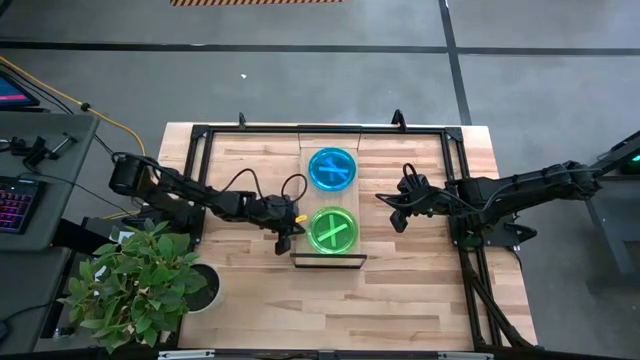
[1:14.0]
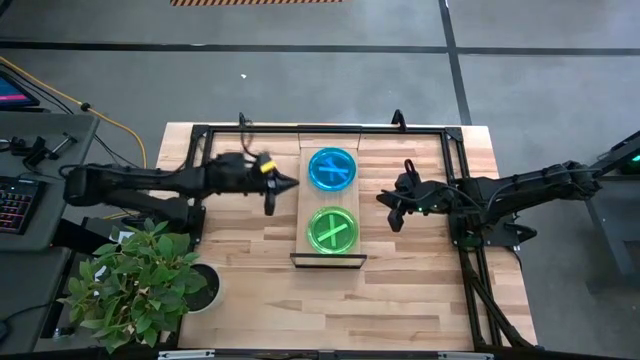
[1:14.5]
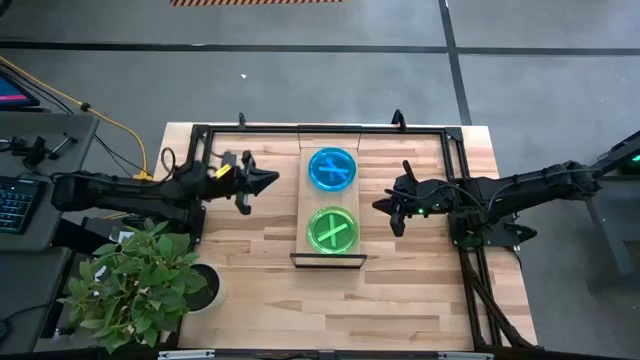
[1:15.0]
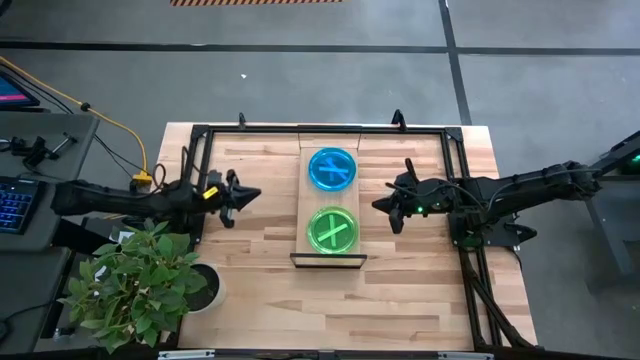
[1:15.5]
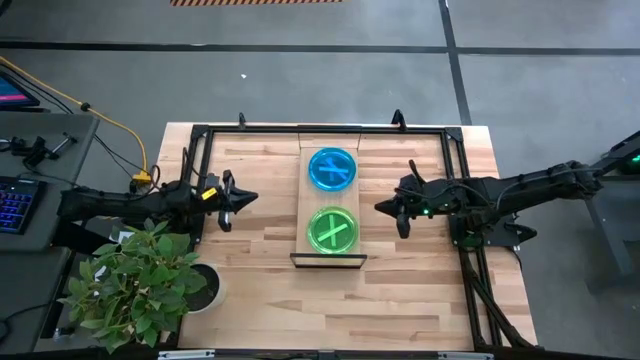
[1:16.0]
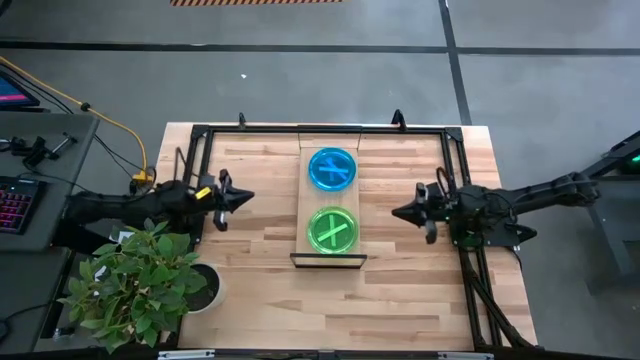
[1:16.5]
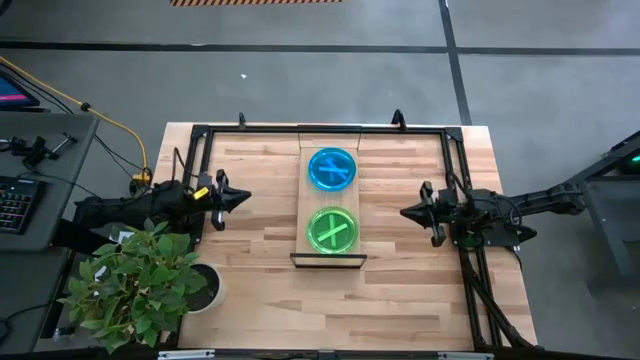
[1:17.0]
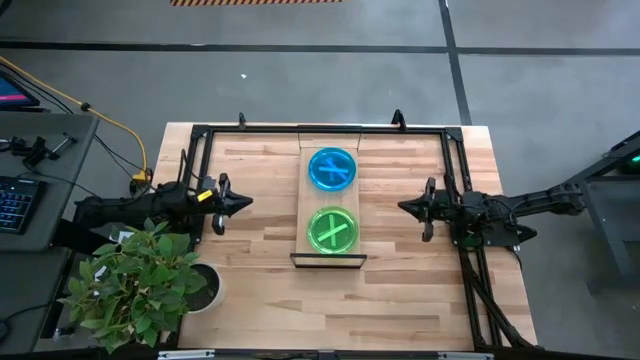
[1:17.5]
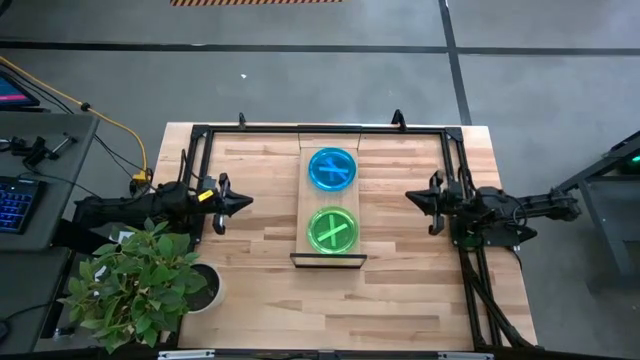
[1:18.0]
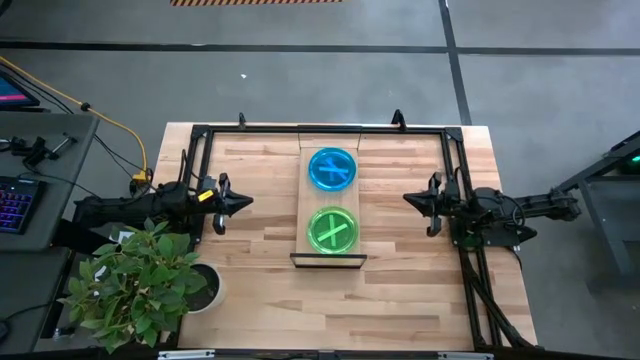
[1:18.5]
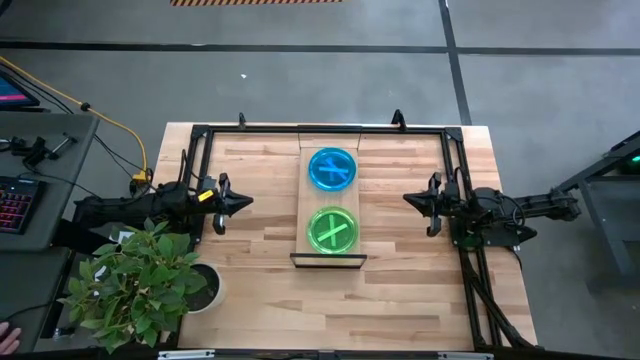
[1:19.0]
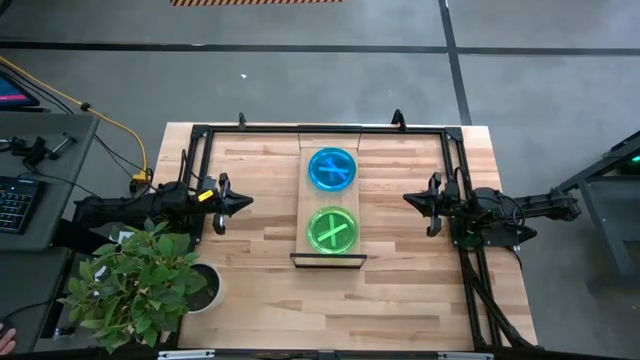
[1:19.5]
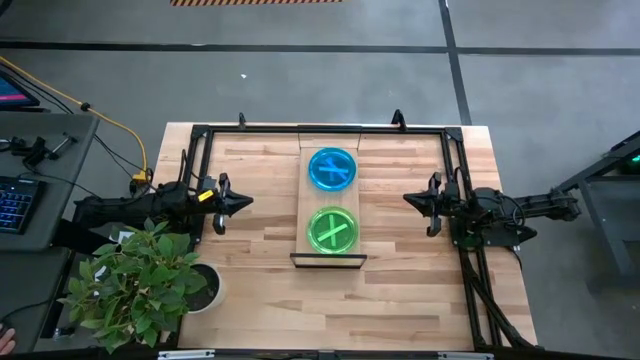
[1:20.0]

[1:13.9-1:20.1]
Task: Place and stack plates onto a shelf
Return to Home Position

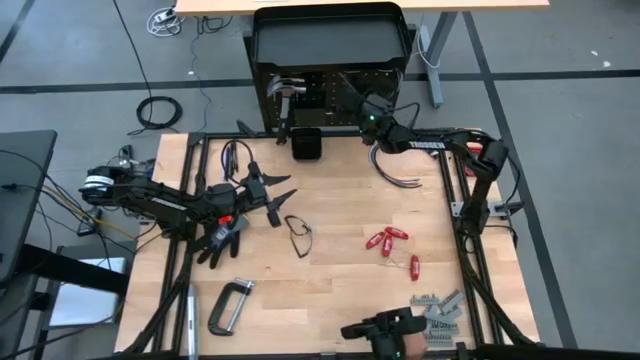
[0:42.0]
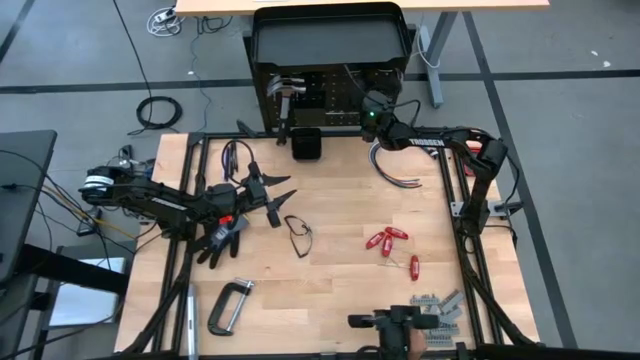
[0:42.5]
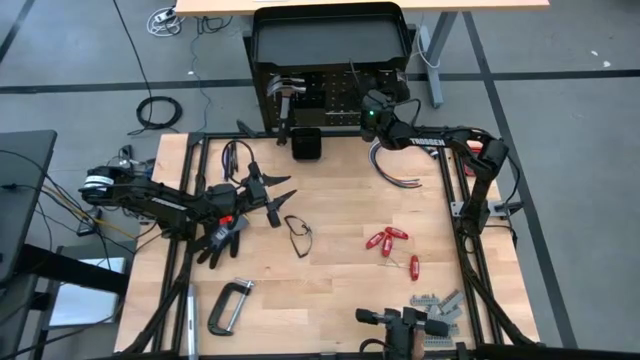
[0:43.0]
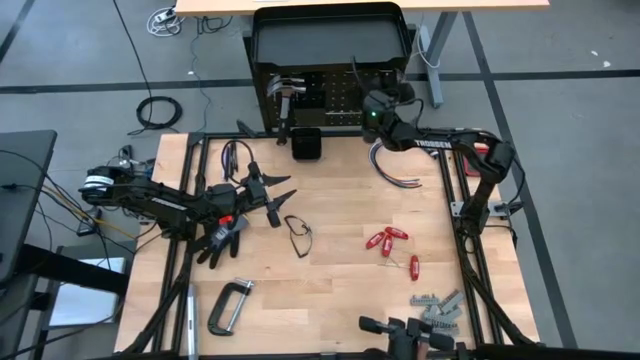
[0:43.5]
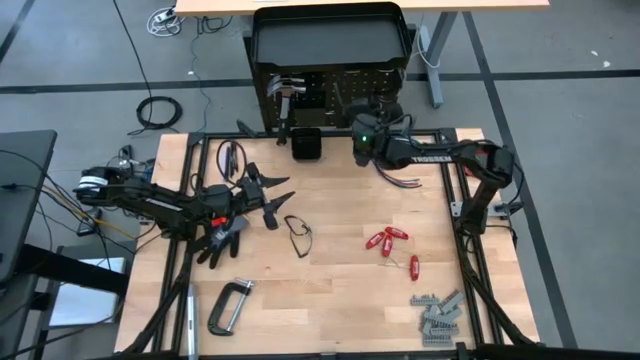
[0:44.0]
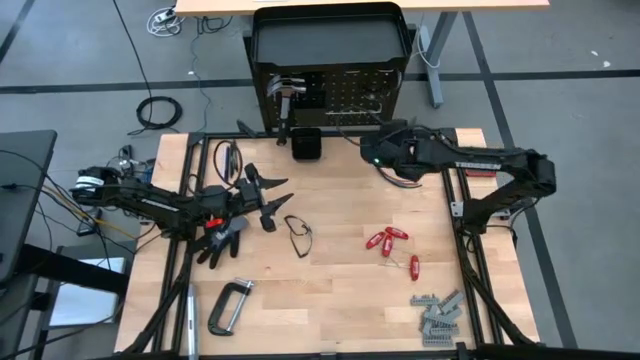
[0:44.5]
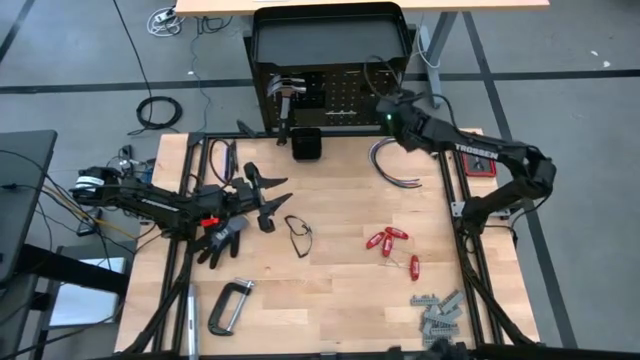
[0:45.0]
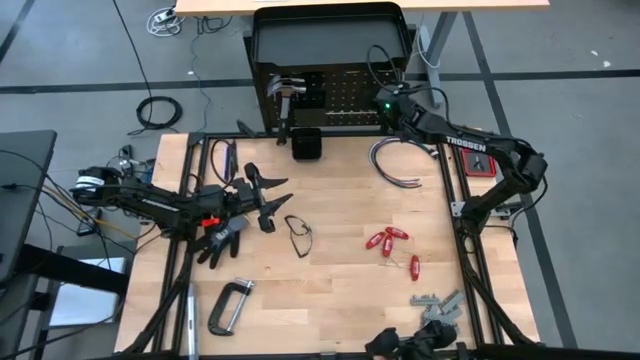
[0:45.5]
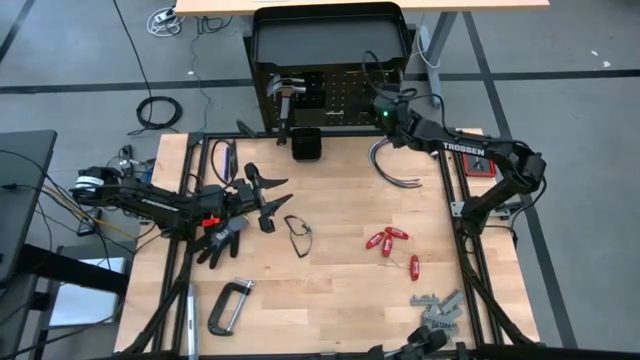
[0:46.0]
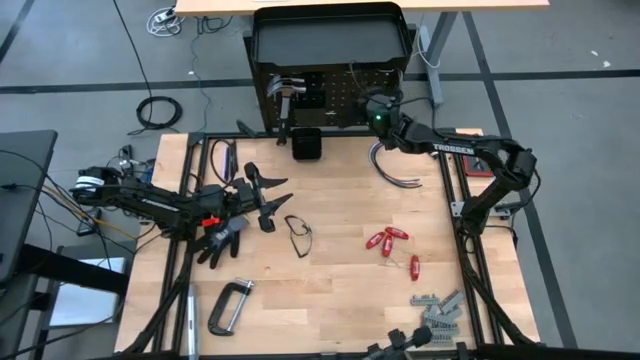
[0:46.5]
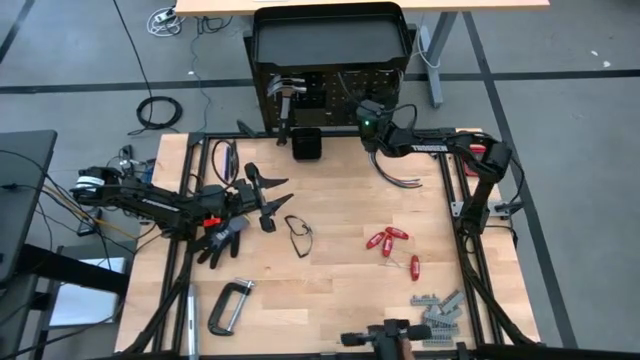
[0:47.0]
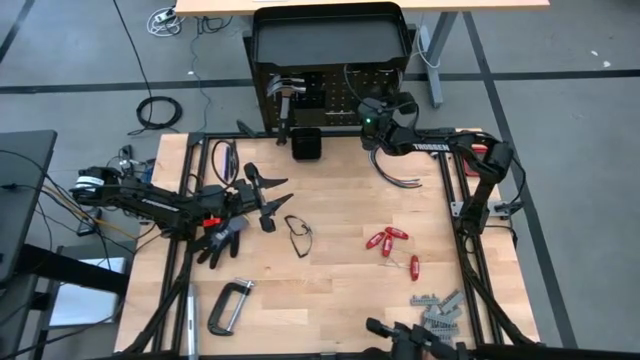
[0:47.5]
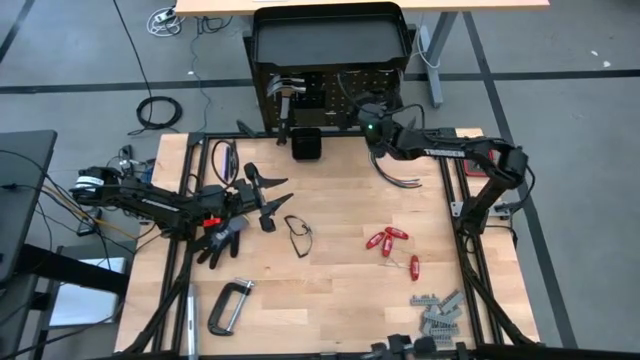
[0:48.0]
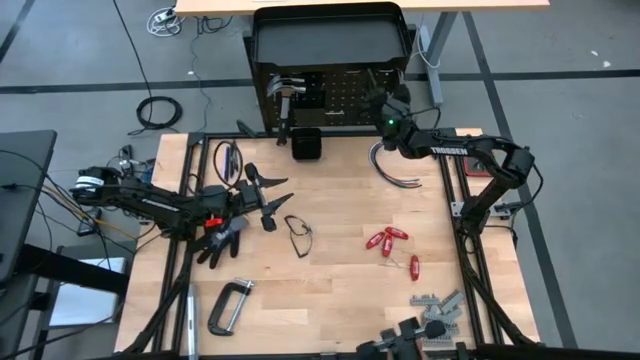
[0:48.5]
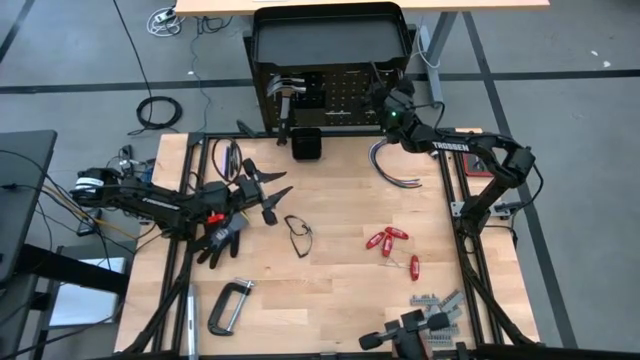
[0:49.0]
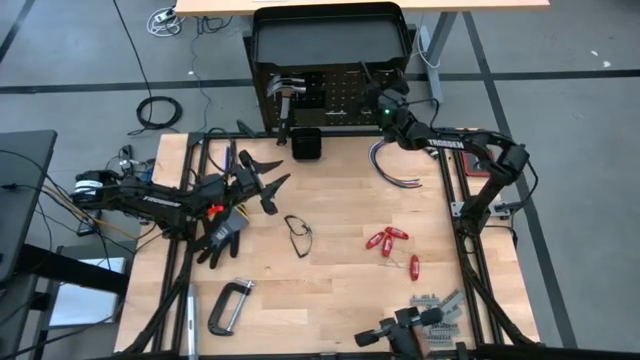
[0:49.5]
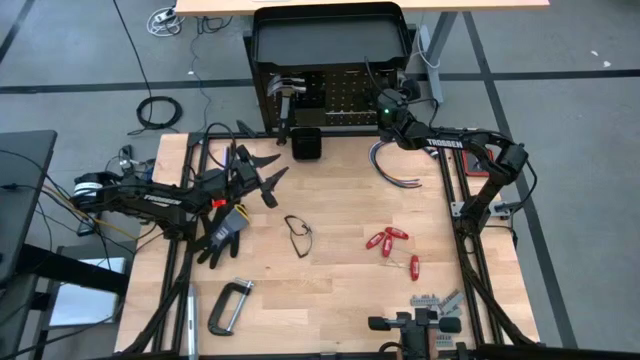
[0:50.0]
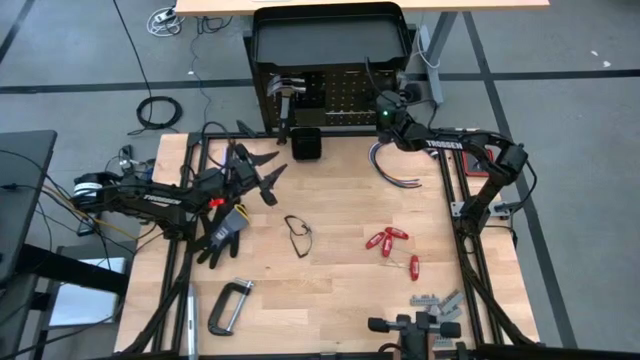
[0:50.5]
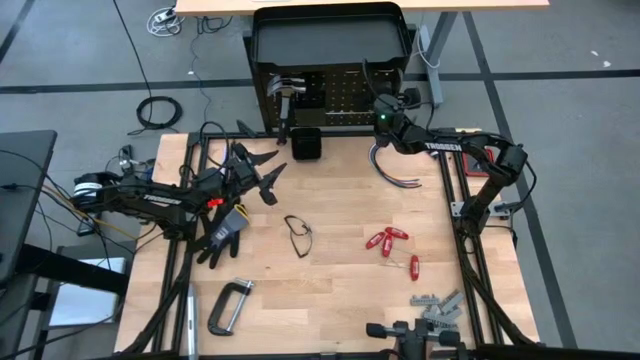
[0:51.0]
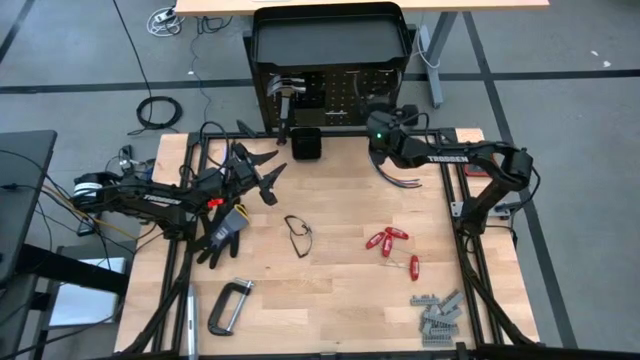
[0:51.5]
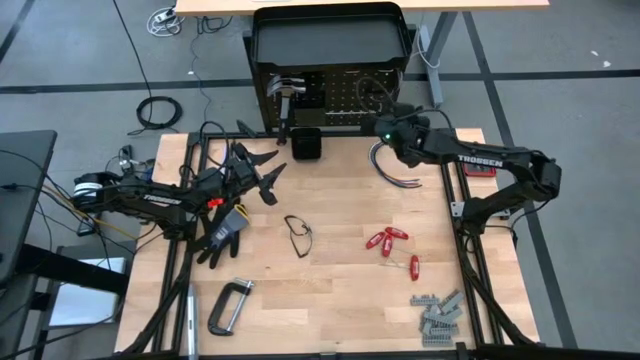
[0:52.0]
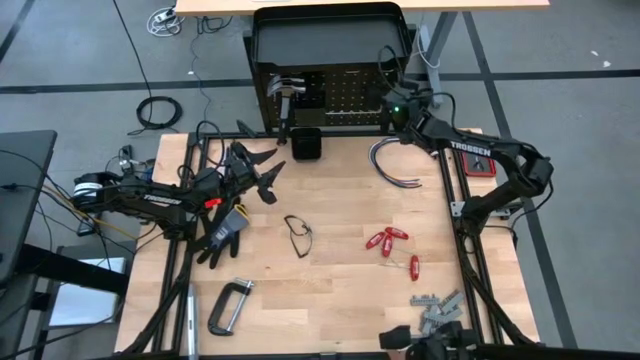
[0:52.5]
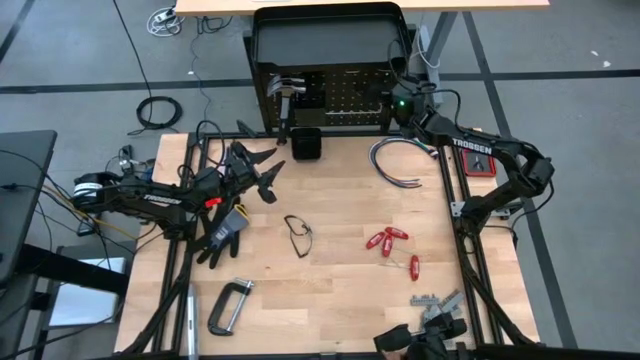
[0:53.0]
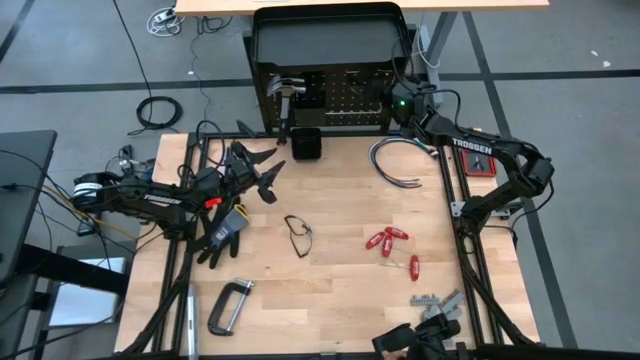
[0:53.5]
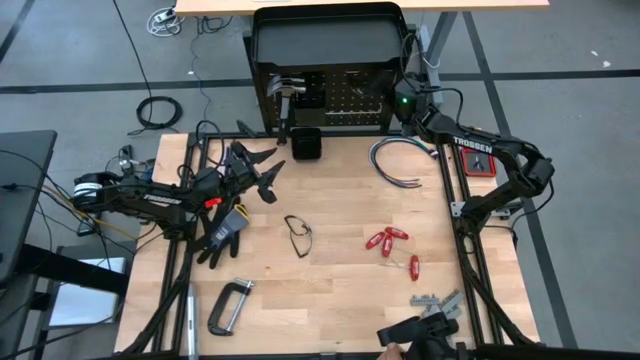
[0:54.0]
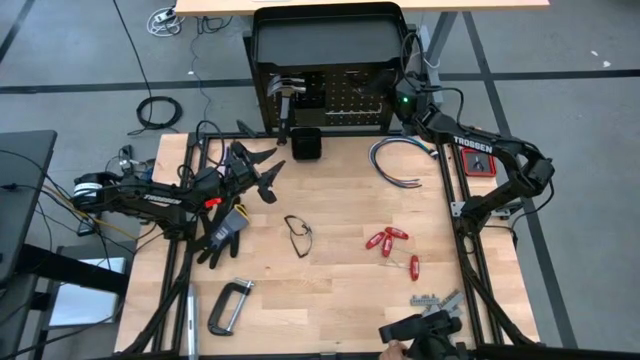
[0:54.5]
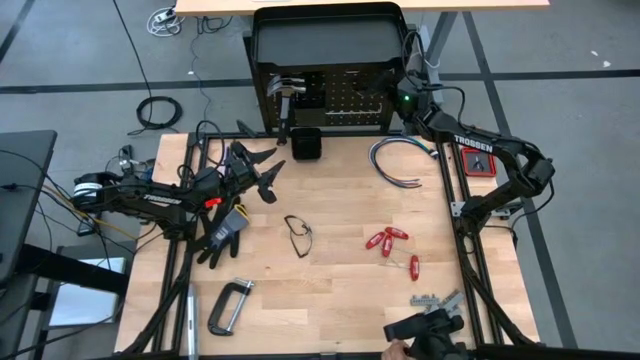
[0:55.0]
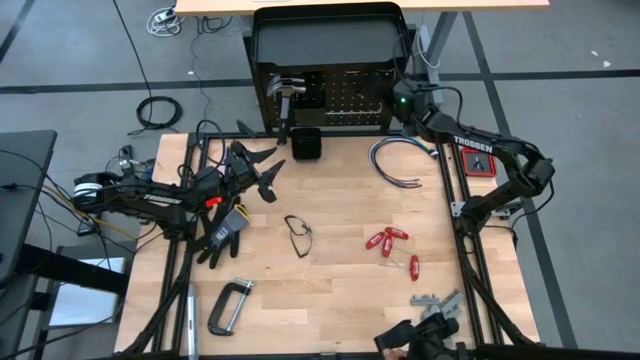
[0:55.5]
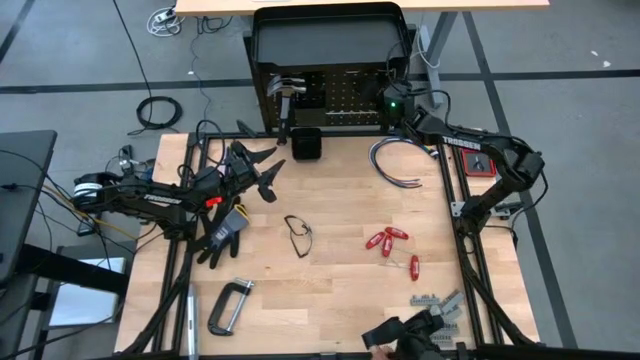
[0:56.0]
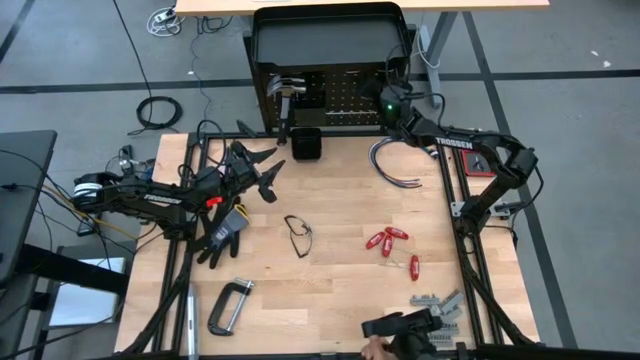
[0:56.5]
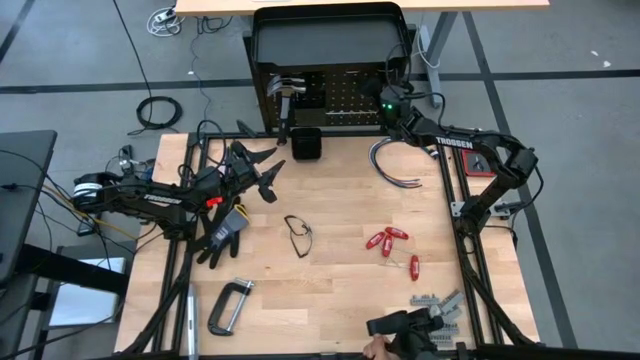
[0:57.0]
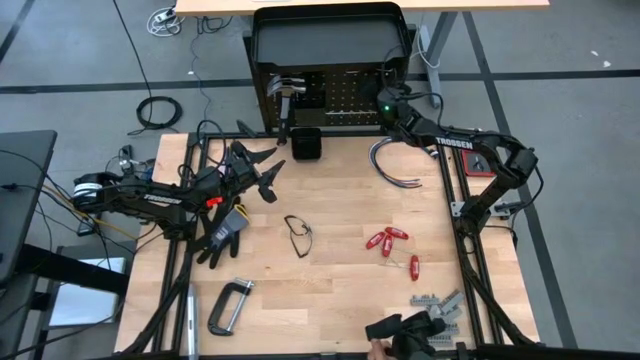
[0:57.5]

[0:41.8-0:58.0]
Task: Hang tools onto peg board
Hang the safety goggles on the peg board
